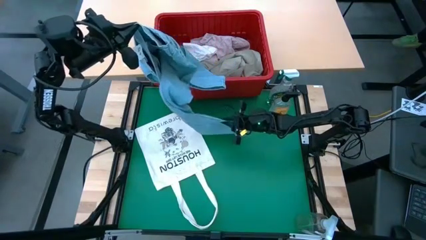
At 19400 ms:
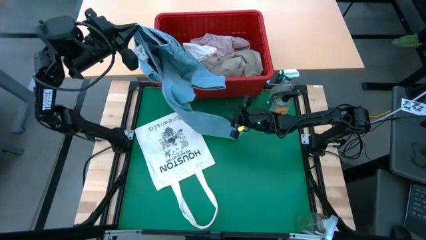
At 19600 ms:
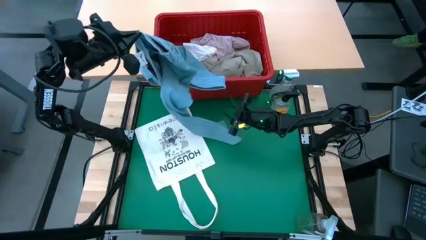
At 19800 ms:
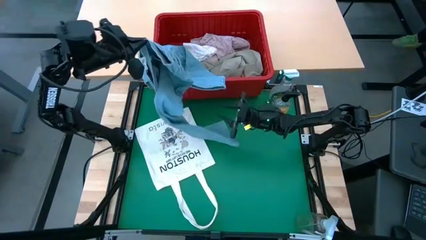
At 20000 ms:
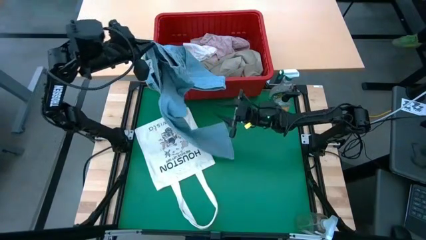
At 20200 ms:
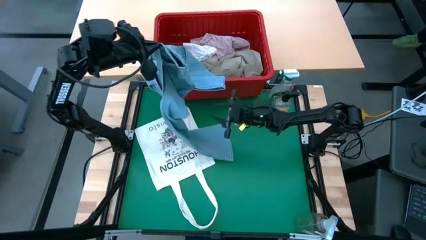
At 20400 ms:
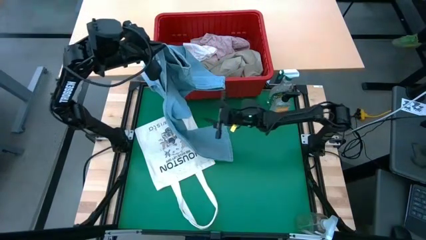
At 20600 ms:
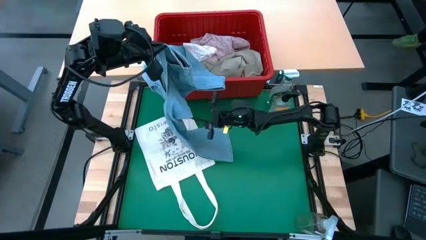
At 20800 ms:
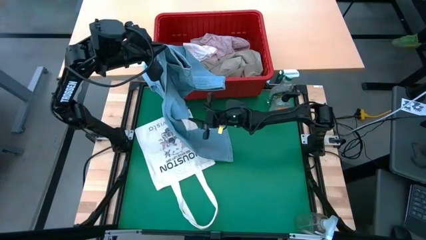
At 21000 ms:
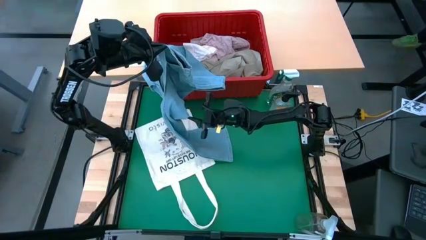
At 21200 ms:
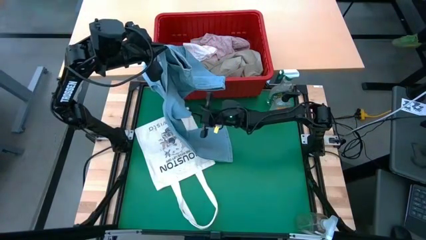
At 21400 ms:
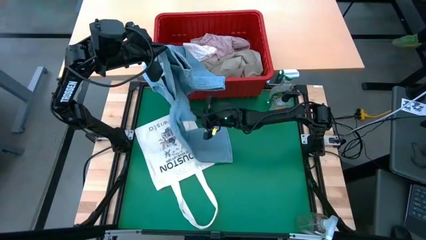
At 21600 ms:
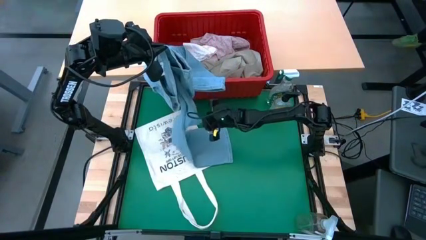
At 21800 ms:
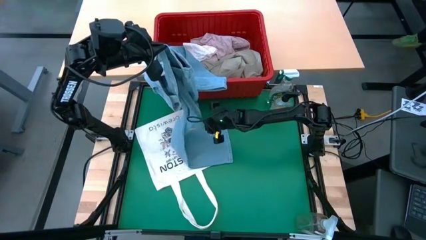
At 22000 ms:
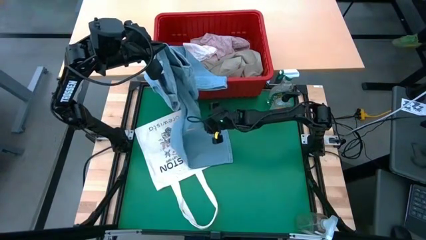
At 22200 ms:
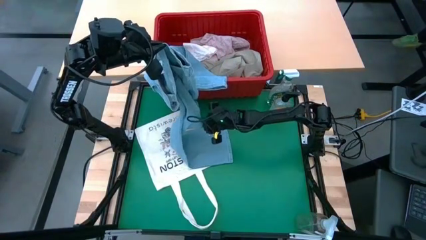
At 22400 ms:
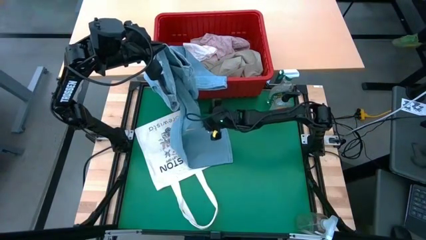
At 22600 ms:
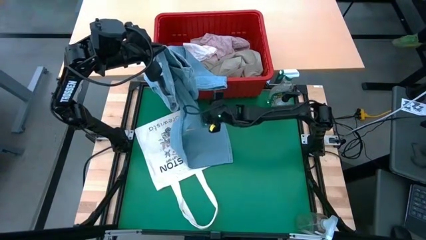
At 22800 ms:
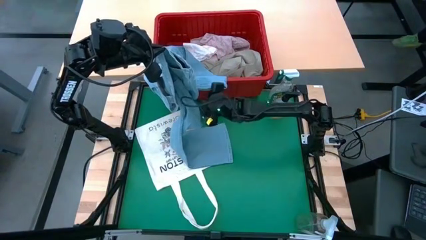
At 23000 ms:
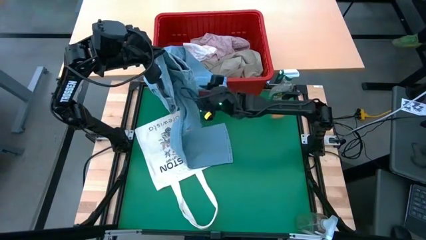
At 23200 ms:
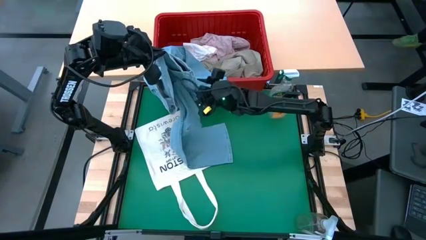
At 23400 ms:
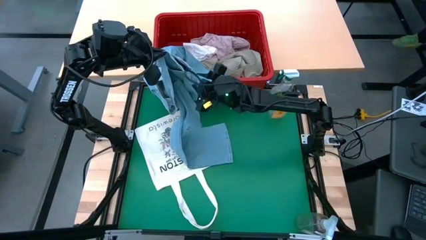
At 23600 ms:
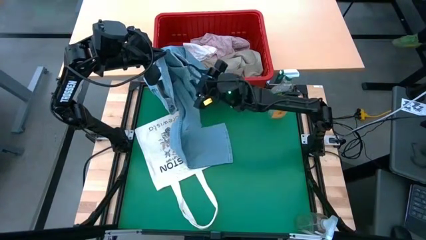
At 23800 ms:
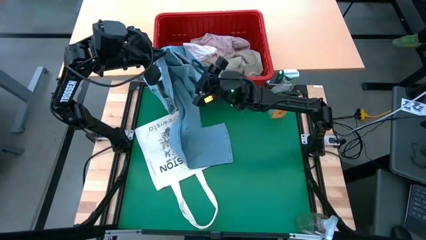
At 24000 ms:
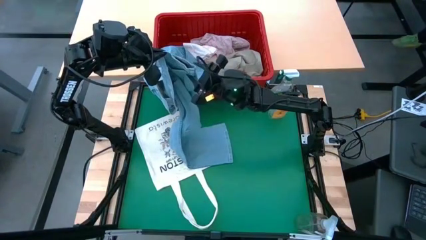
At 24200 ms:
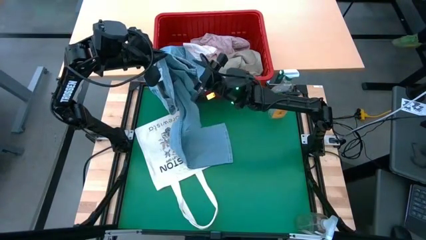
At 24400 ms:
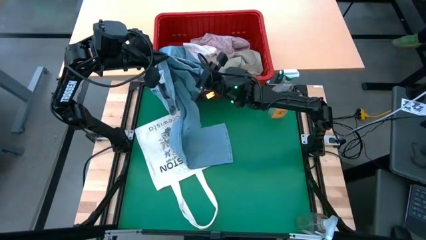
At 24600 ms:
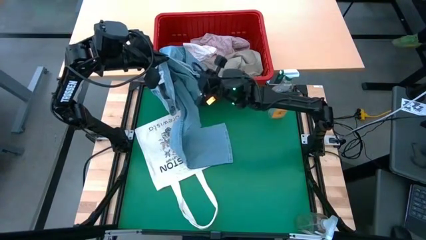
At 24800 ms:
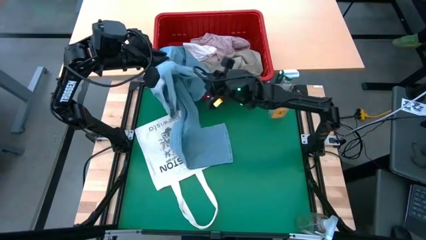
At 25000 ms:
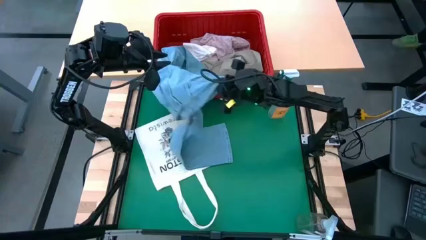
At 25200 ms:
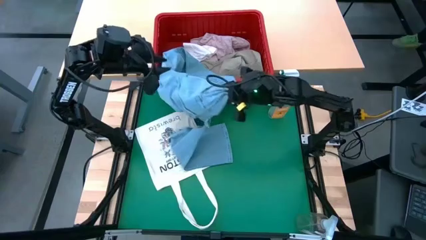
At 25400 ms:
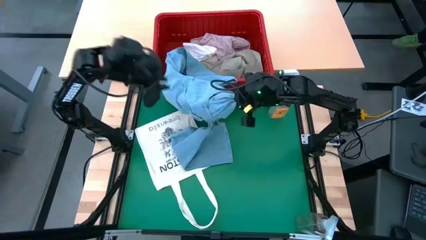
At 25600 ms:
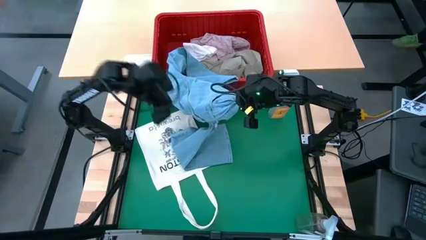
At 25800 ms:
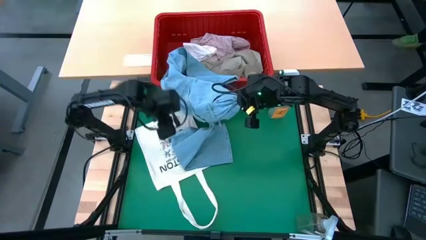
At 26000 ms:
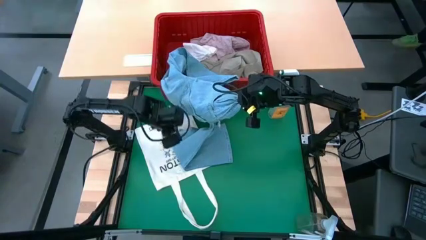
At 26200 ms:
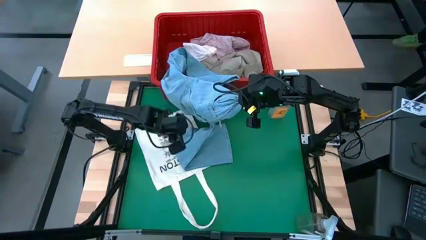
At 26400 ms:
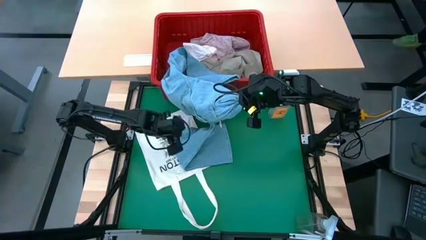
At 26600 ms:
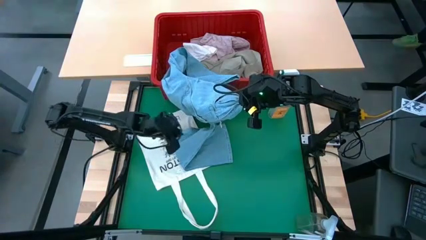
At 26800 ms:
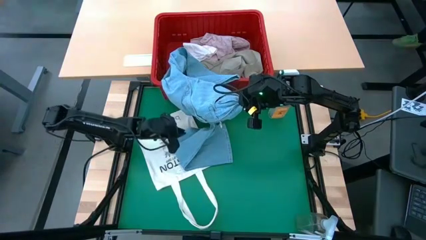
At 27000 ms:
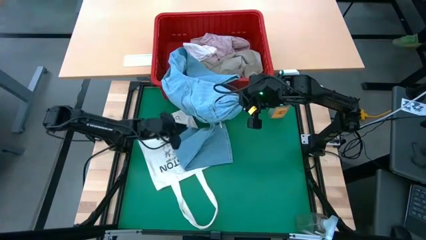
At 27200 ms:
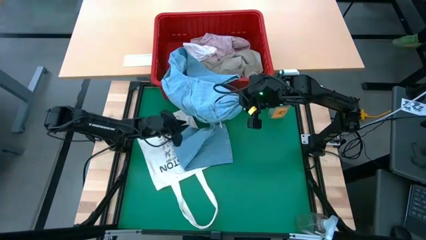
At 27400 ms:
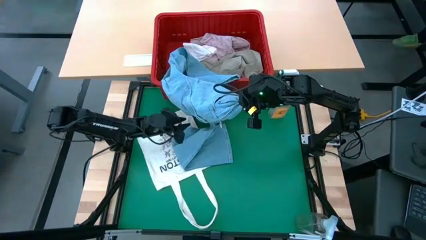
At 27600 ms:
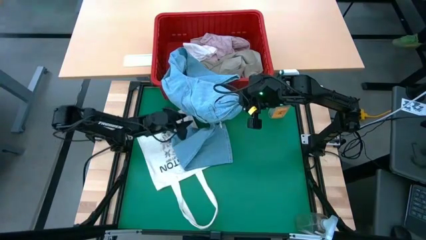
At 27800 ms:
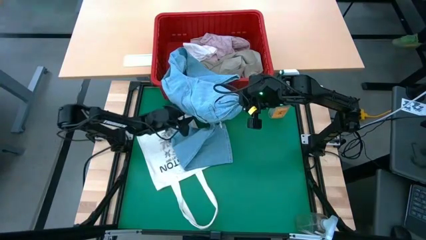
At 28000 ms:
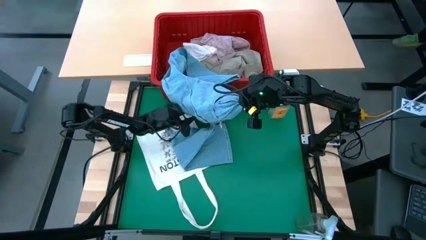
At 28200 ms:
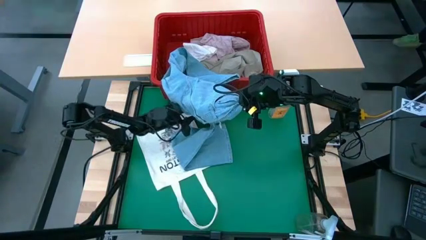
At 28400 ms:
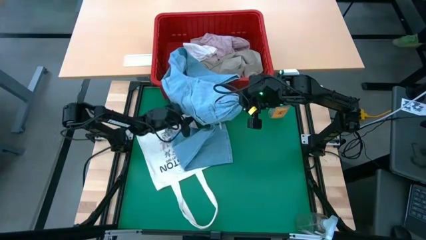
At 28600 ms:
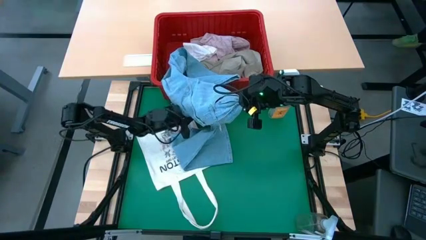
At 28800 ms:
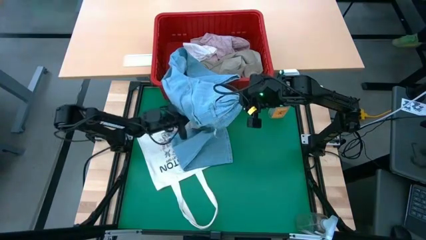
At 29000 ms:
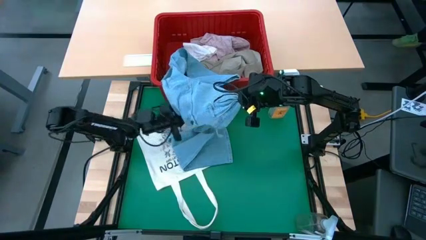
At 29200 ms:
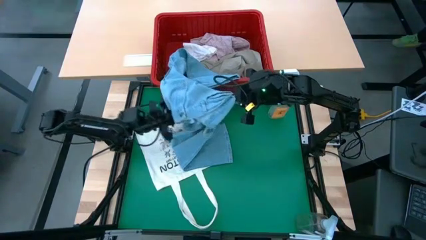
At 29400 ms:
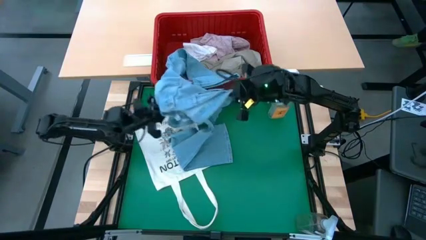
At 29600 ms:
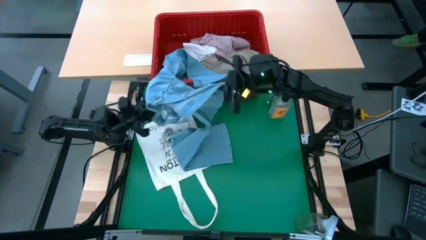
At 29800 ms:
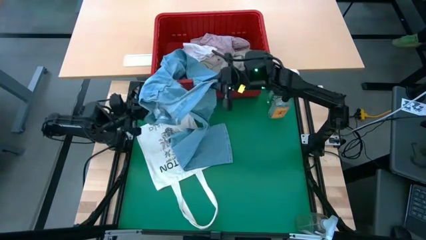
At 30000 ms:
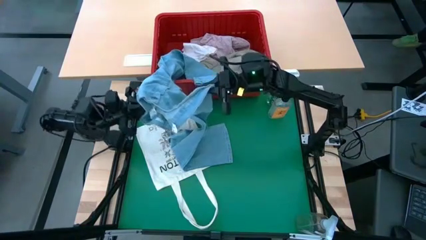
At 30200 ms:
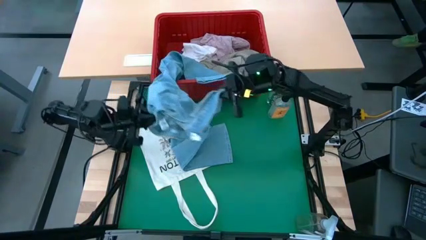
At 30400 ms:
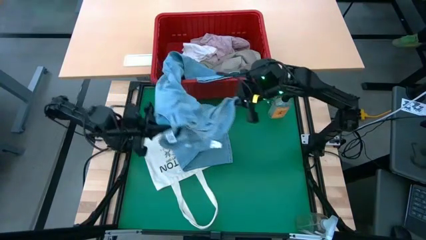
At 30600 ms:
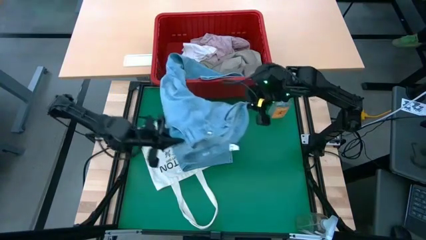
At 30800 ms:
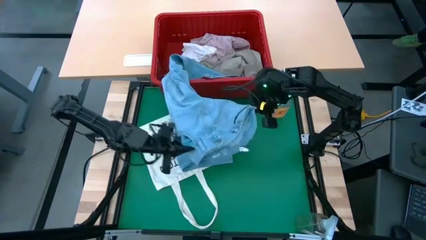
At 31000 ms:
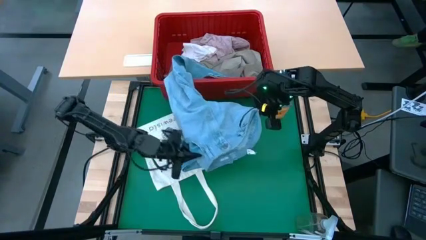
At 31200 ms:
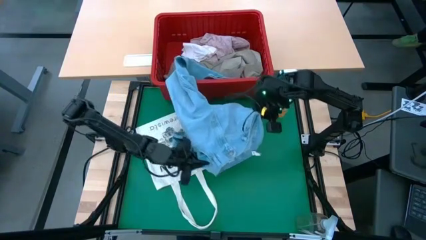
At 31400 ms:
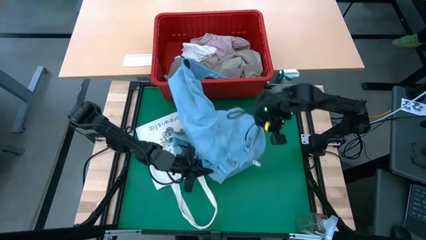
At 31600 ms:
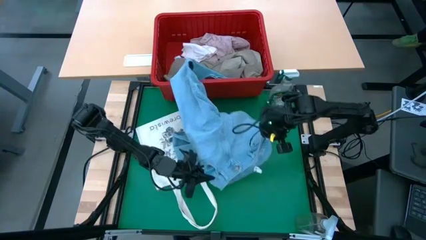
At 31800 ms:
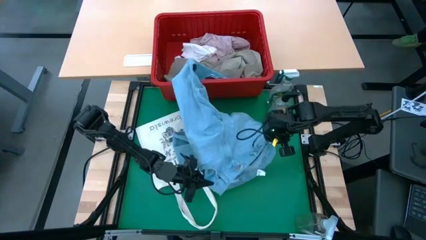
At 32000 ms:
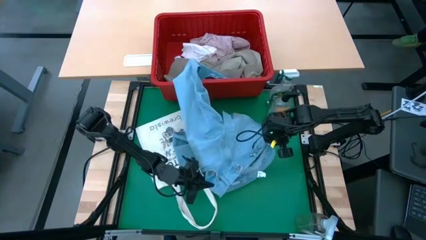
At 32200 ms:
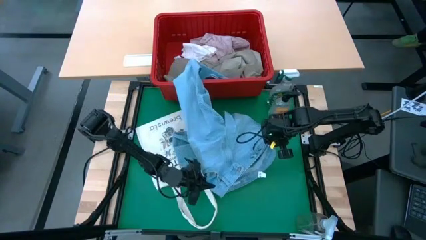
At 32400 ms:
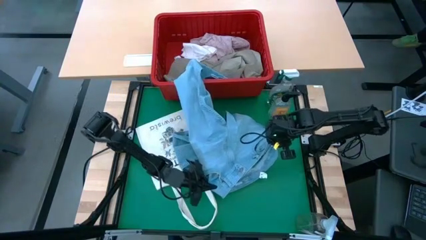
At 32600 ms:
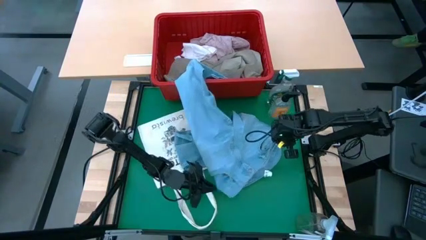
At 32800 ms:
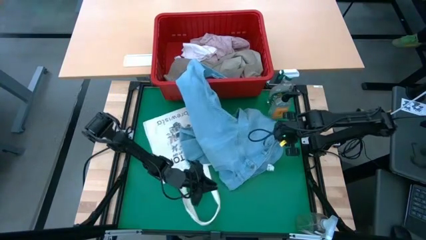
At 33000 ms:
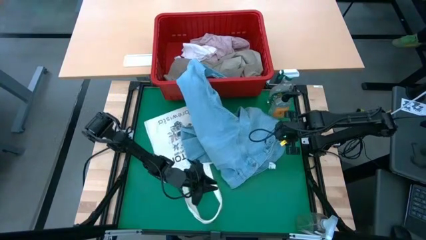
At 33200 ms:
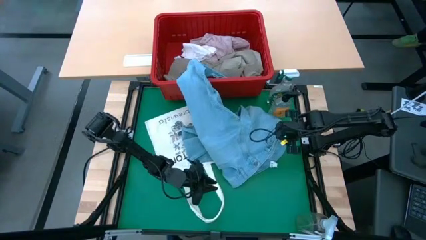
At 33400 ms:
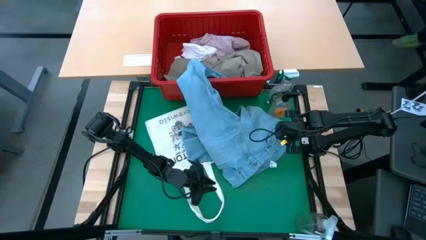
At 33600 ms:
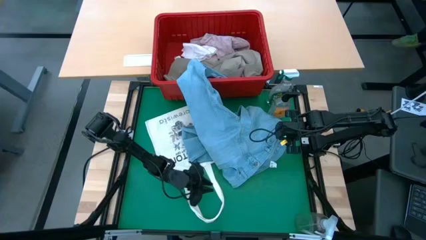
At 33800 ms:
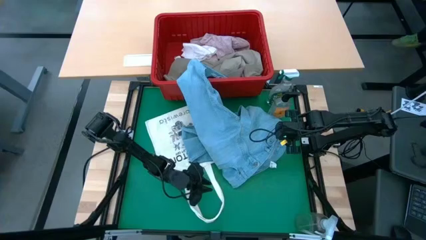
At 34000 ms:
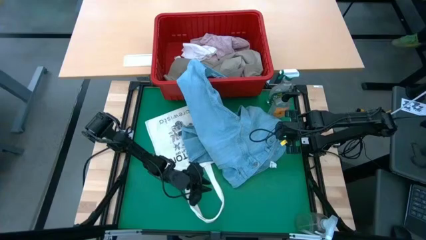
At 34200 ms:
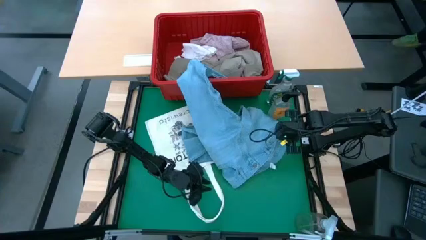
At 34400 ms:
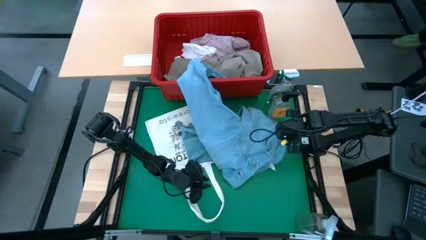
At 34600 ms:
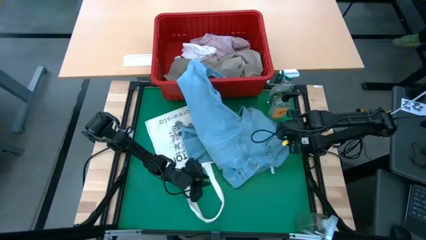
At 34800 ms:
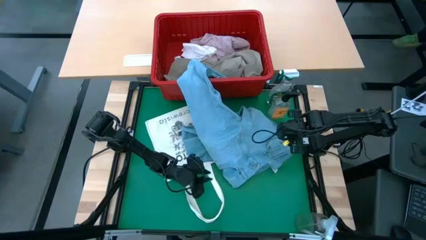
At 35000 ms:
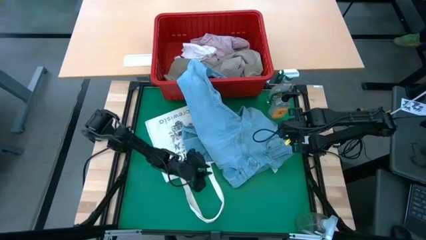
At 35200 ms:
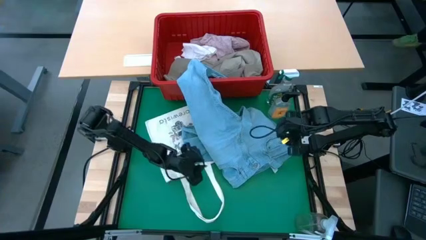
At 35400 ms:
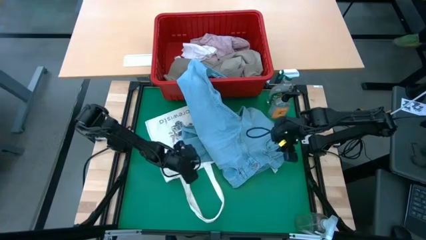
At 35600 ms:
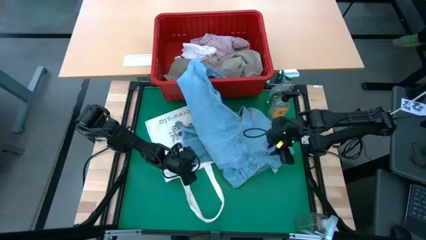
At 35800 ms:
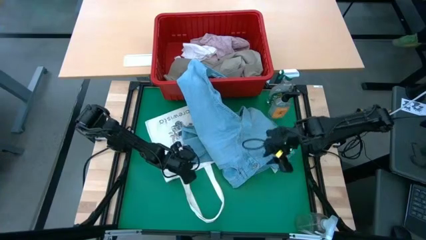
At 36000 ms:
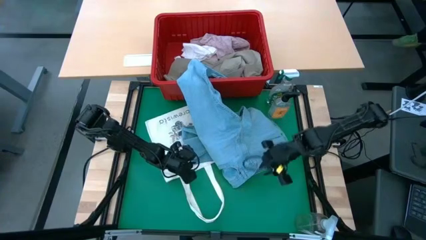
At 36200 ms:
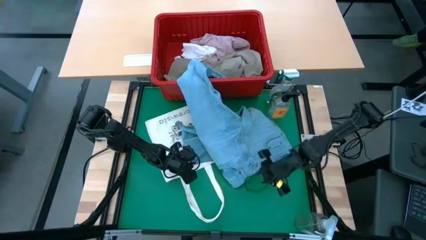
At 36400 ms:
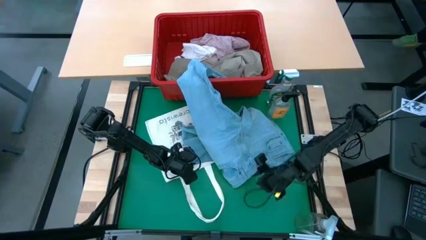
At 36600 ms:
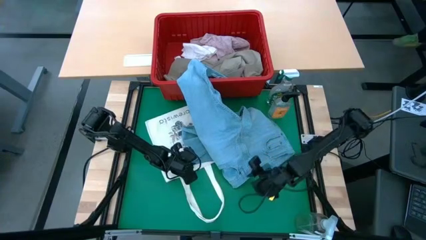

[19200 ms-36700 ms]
Task: Fold laundry
Remove the light blue pants from the red bin
